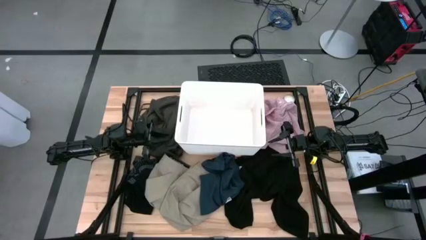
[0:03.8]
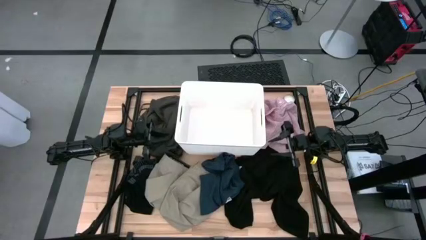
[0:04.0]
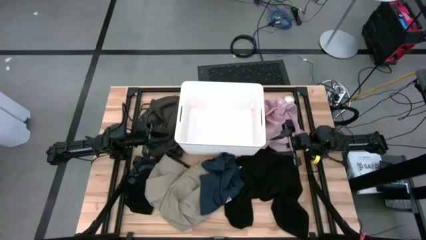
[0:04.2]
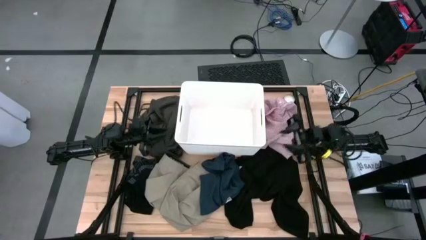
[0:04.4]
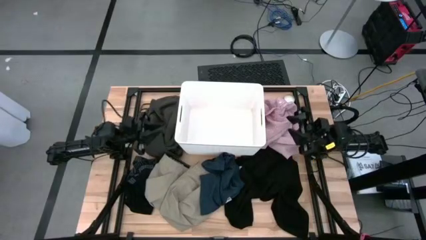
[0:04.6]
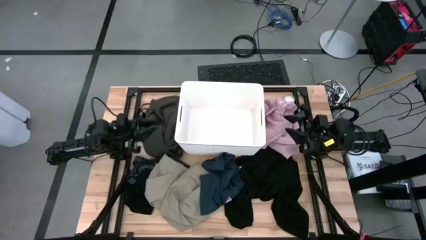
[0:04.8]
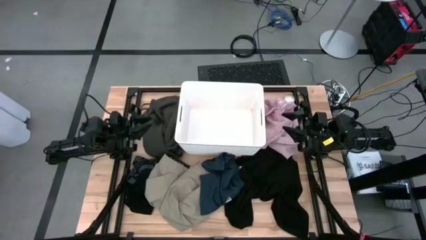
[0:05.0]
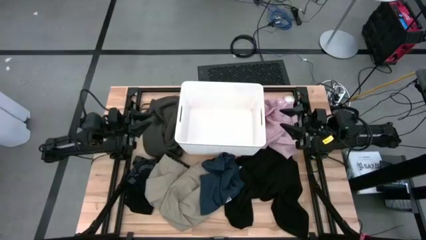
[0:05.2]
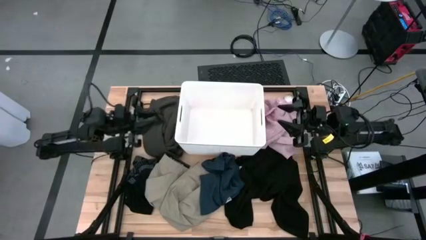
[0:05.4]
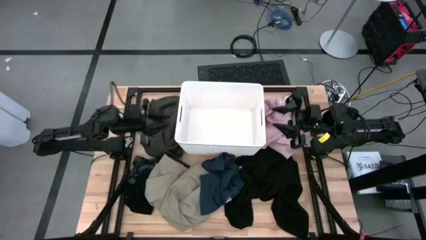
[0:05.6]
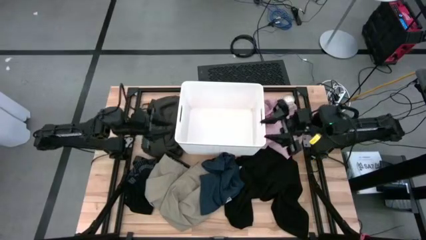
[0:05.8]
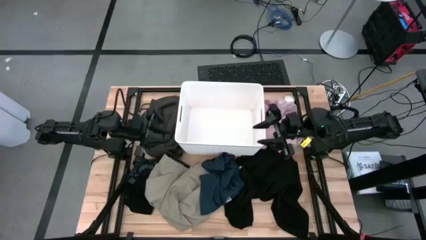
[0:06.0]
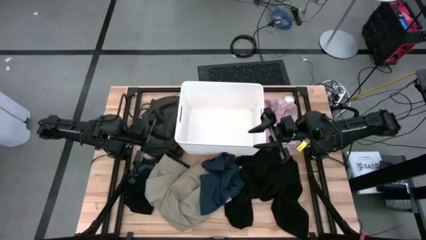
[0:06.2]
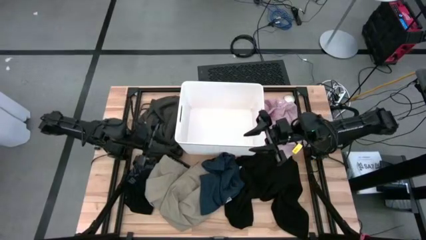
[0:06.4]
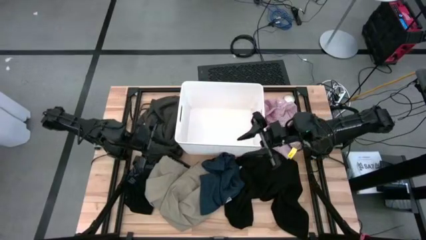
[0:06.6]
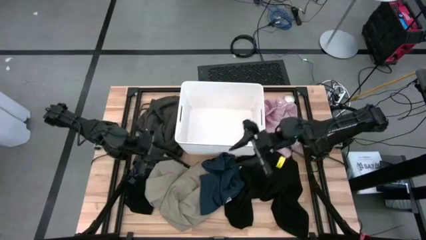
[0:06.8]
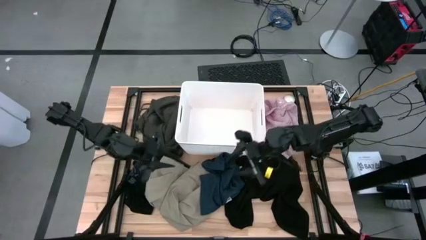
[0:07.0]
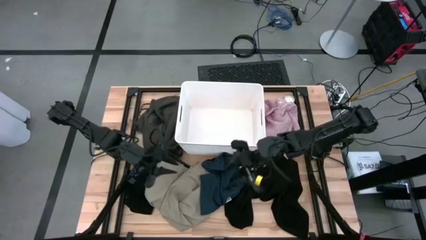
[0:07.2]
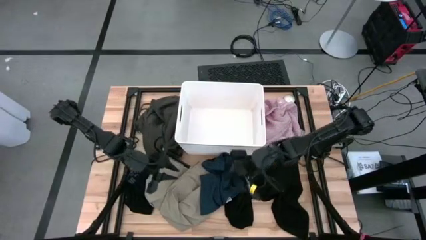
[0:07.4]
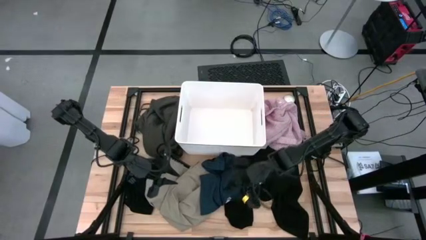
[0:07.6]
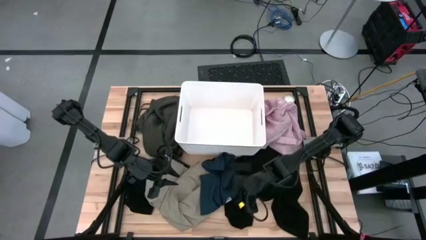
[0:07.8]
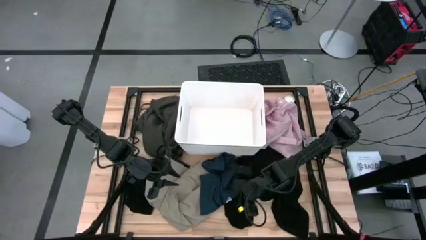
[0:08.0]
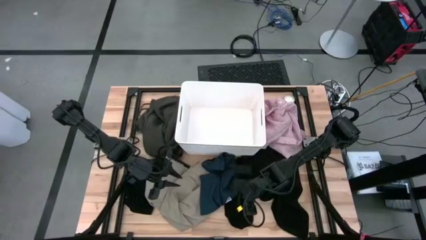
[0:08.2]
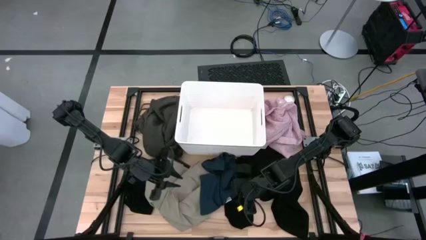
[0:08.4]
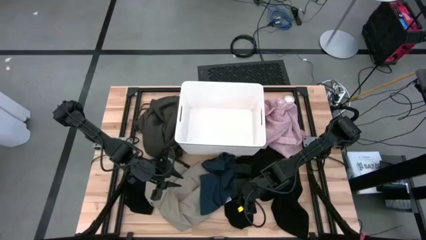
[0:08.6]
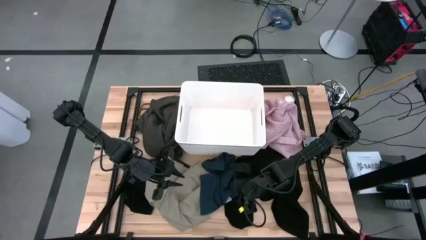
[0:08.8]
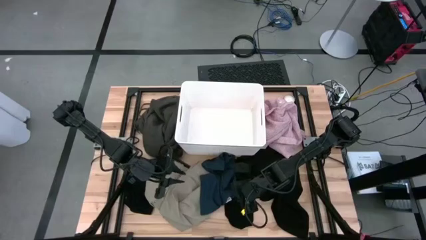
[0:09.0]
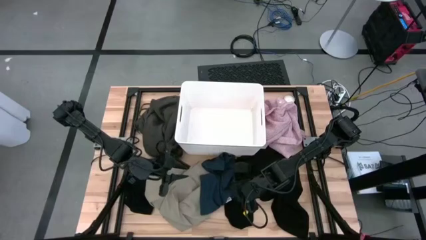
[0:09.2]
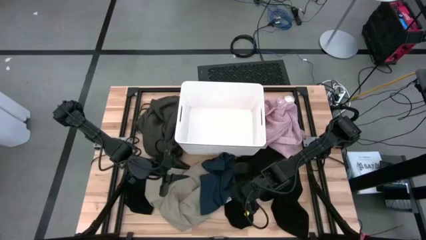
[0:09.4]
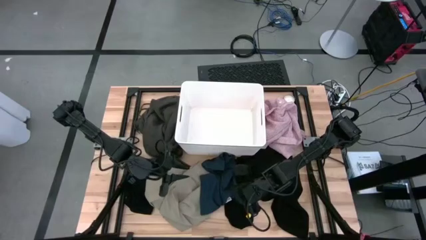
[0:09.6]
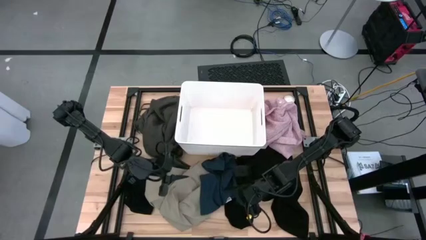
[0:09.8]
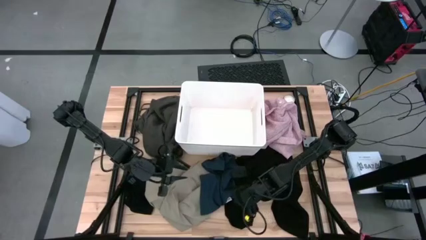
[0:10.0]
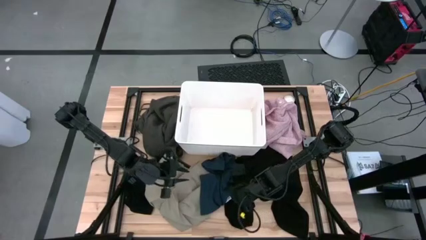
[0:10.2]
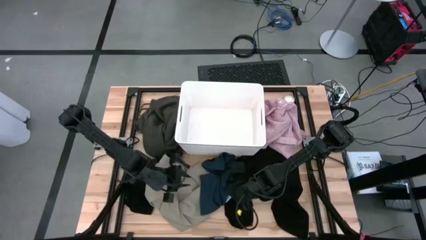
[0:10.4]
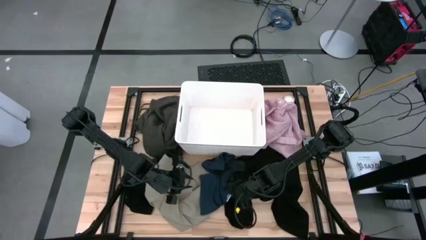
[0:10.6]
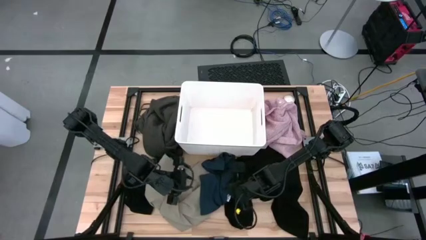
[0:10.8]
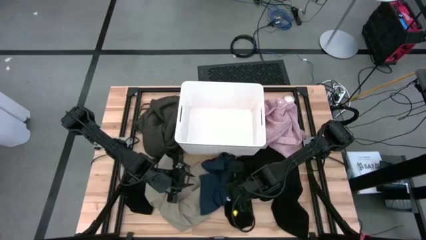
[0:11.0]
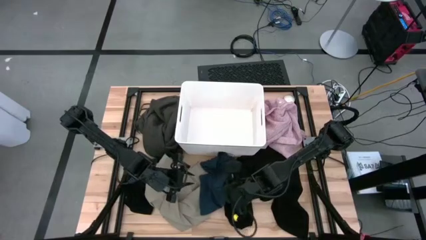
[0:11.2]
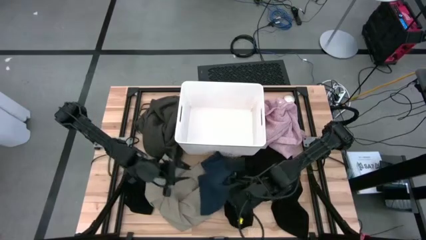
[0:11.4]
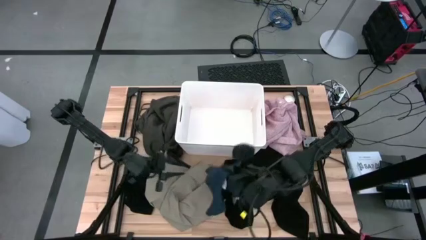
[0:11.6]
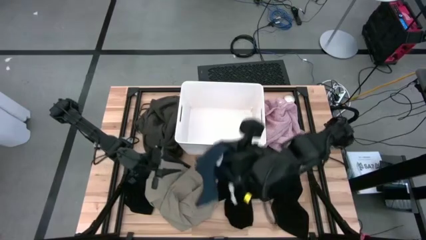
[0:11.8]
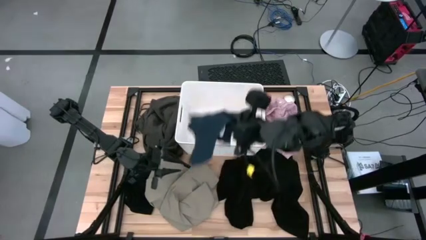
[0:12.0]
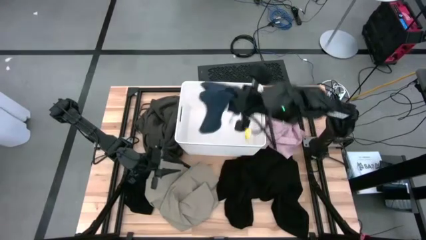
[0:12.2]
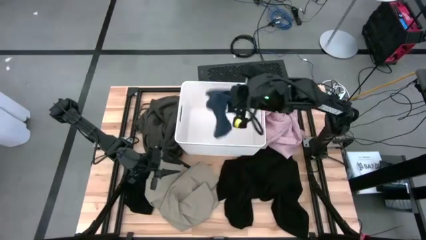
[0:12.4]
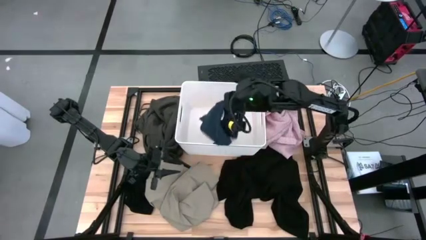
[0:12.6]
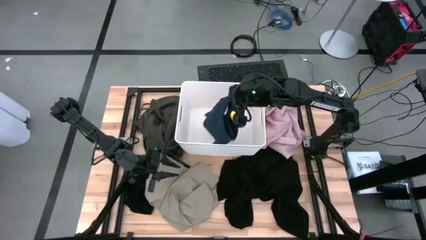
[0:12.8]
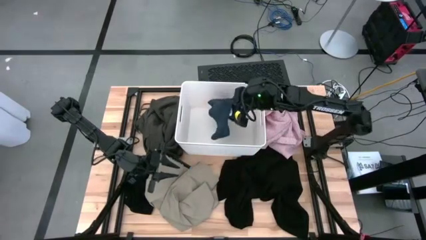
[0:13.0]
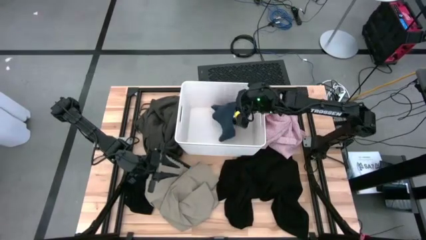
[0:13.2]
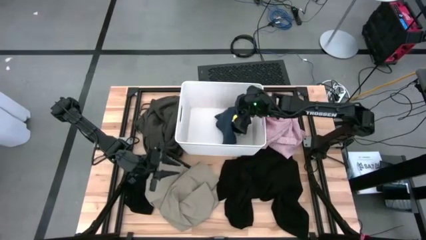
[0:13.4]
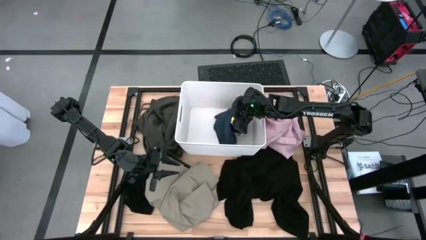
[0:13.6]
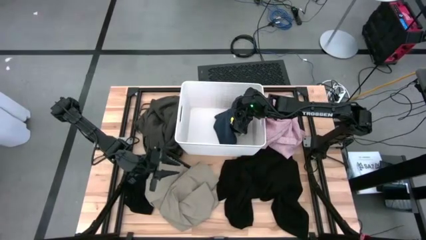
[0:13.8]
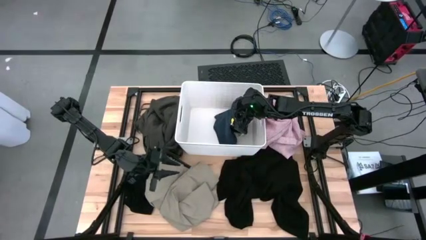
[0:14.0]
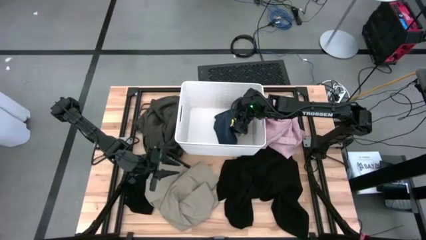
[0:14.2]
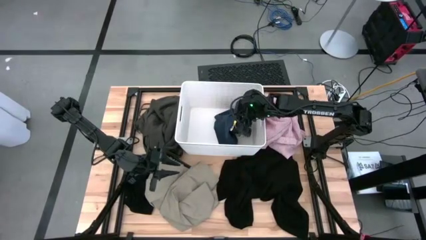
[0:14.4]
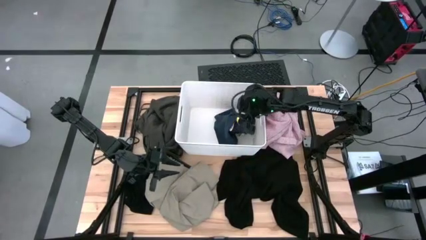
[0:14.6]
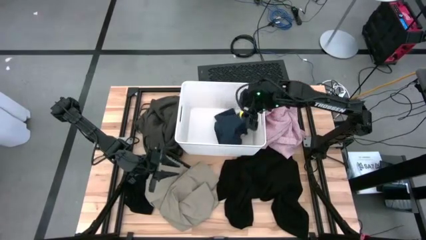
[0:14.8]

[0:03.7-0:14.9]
Task: Sort clothes
Put the blue shorts into the laundry organizer bin

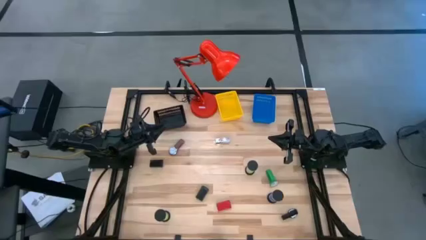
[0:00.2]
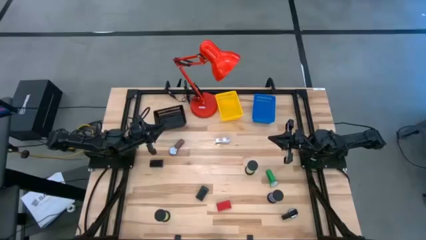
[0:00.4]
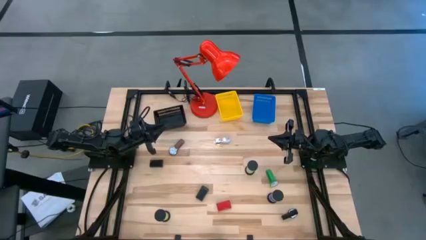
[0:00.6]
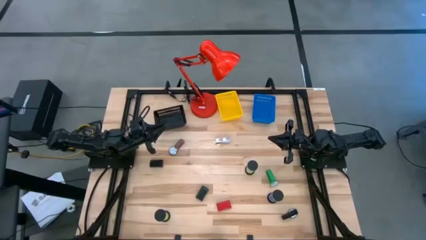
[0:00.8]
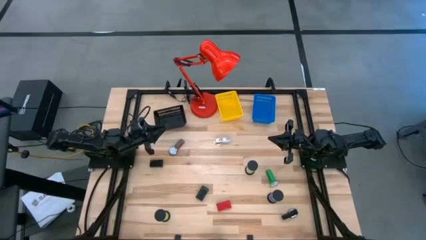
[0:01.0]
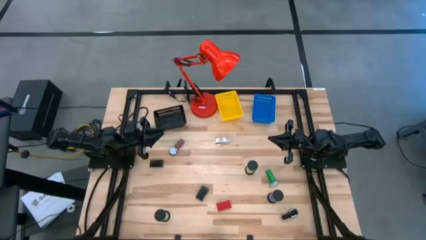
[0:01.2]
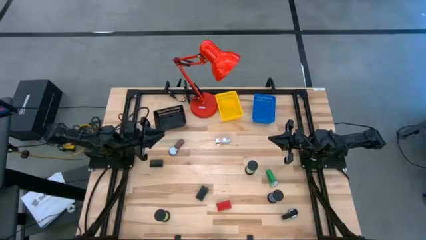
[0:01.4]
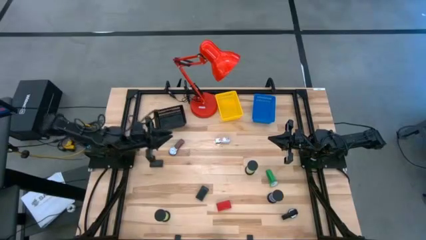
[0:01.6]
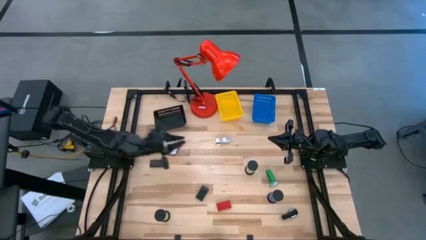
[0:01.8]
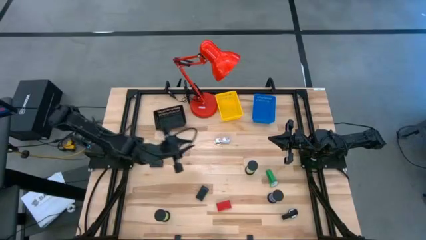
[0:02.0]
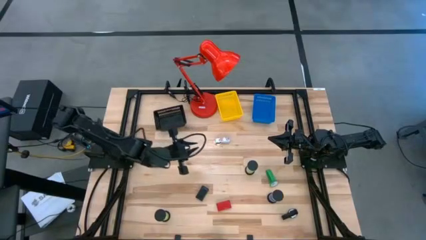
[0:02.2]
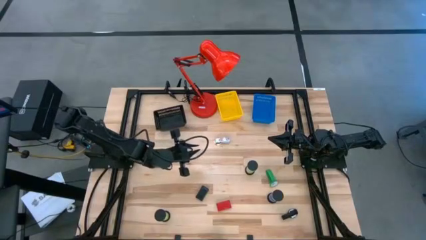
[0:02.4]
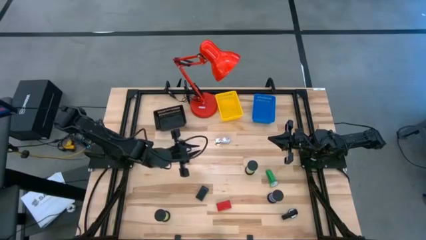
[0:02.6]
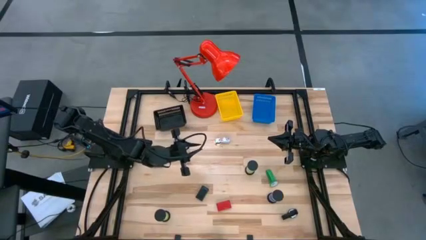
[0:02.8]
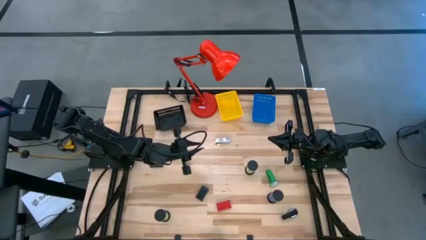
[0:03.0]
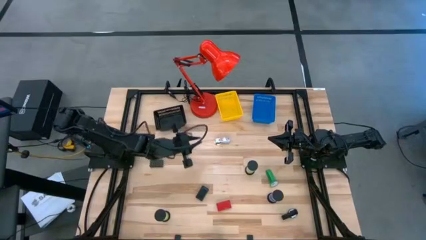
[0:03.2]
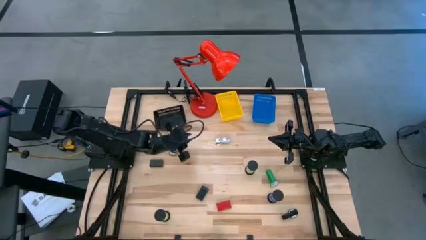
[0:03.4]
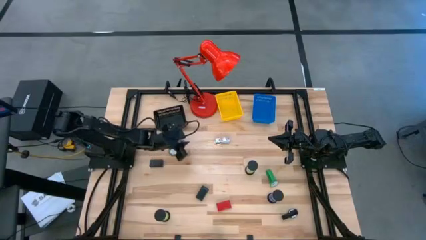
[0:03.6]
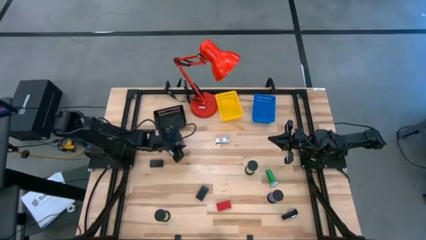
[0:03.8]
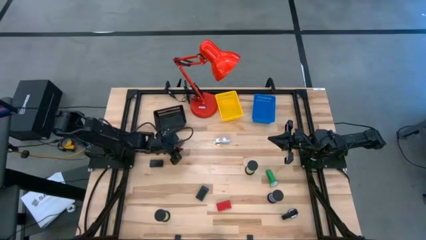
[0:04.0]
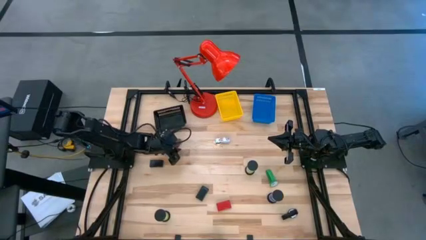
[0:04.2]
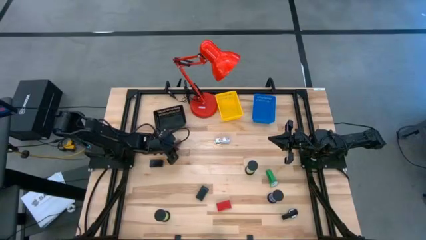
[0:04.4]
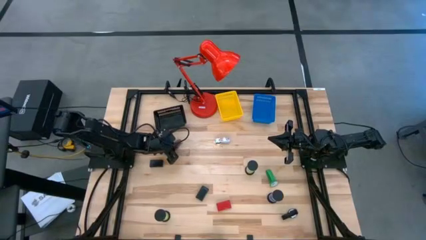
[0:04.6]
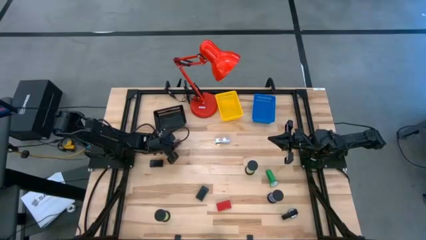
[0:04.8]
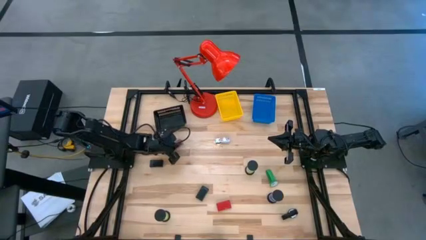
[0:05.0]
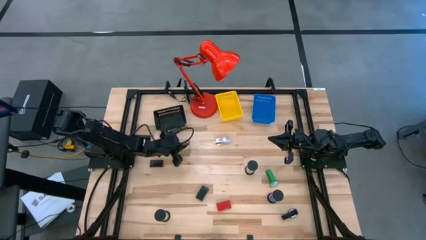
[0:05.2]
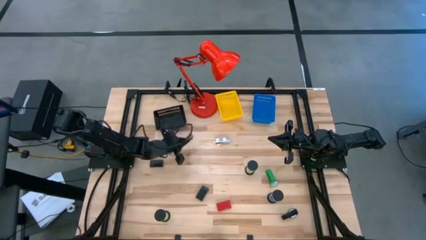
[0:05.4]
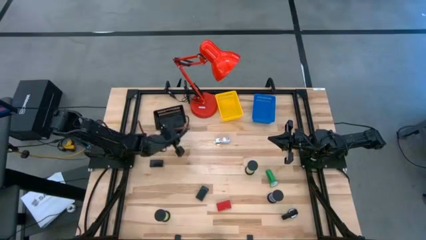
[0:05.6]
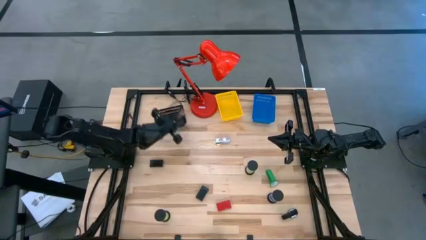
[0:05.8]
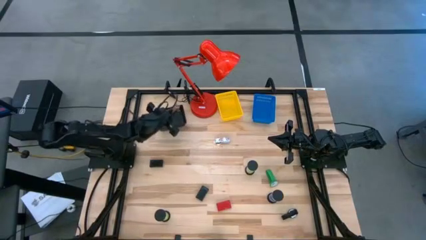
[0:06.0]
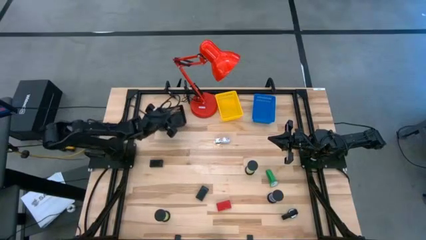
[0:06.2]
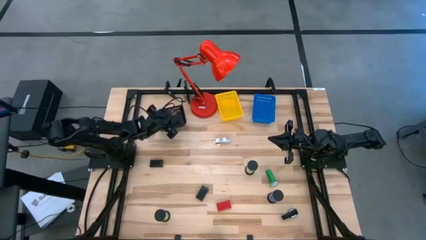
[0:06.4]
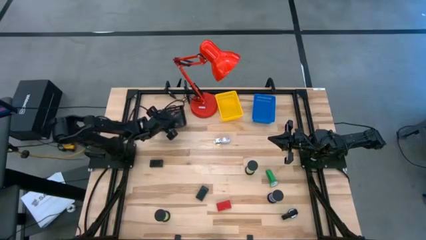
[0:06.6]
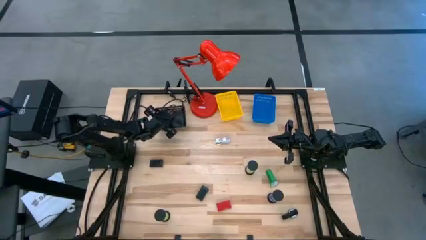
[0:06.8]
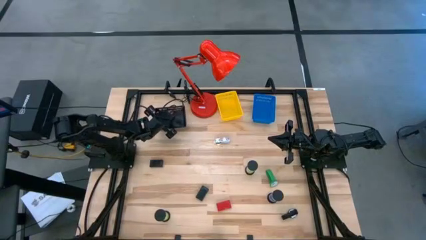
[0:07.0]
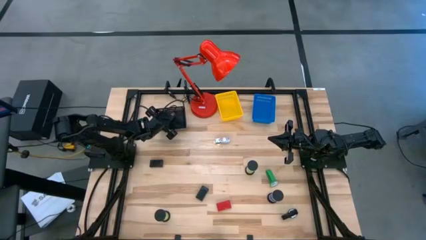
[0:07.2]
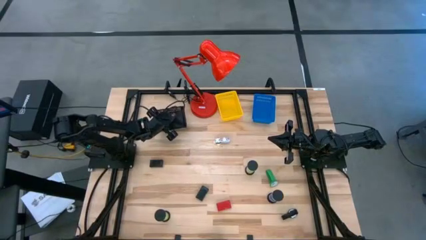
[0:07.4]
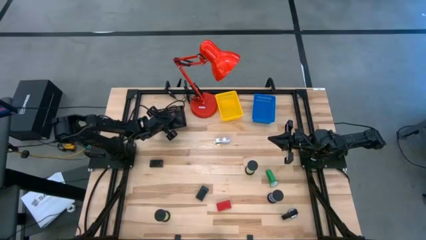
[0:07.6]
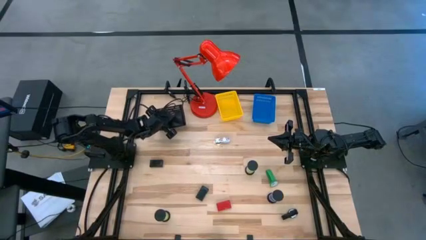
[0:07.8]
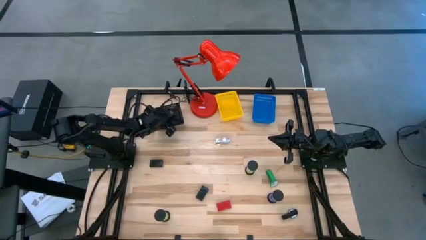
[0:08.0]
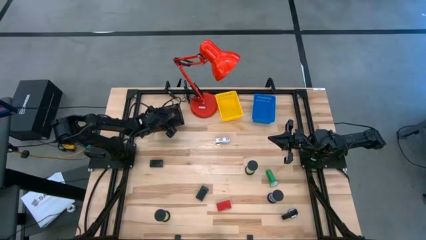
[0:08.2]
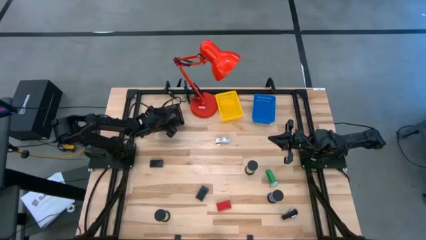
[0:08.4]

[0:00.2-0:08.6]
Task: Pick & Place Office items
Put the brown wrist watch into the black bin
